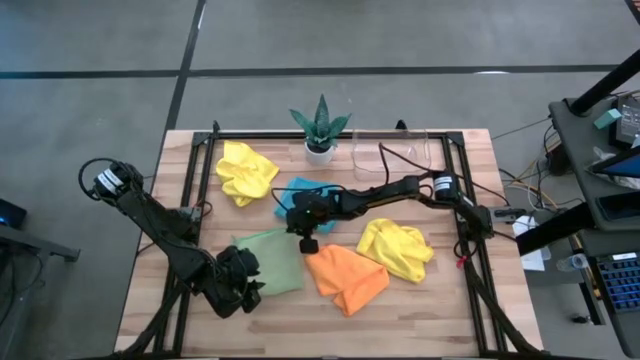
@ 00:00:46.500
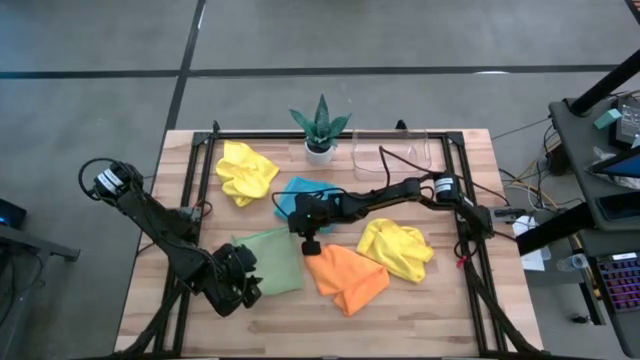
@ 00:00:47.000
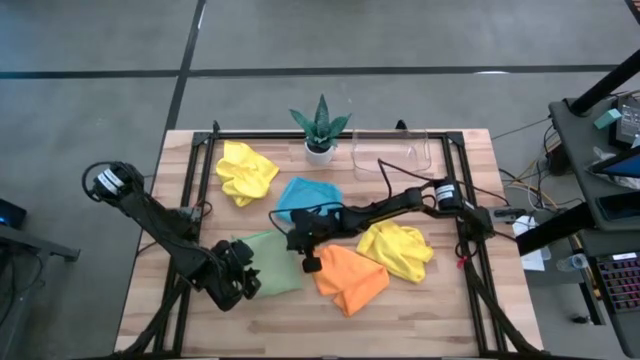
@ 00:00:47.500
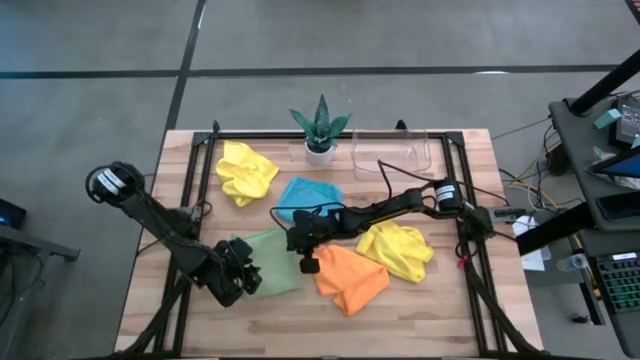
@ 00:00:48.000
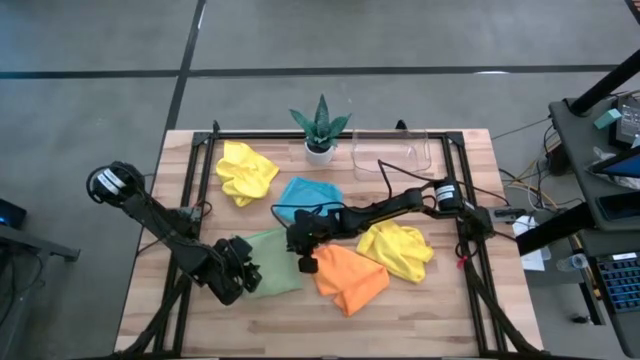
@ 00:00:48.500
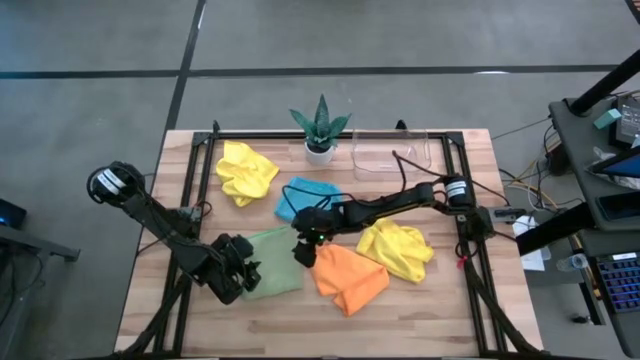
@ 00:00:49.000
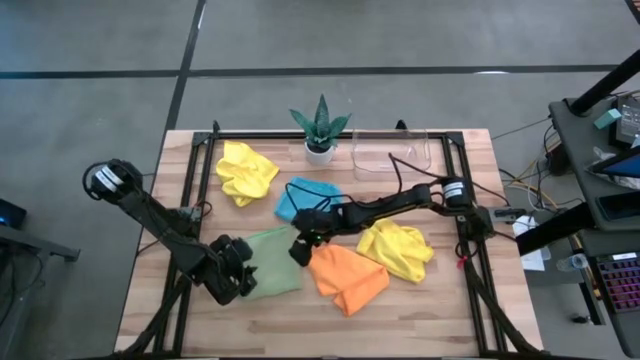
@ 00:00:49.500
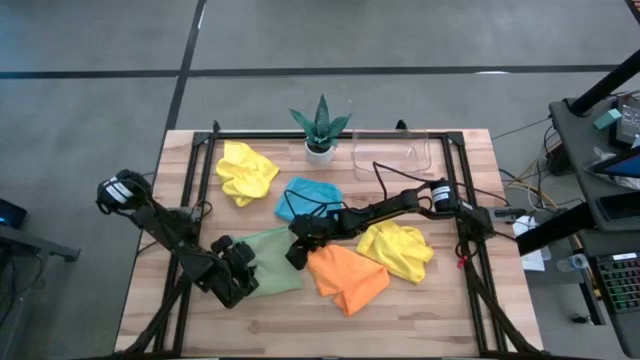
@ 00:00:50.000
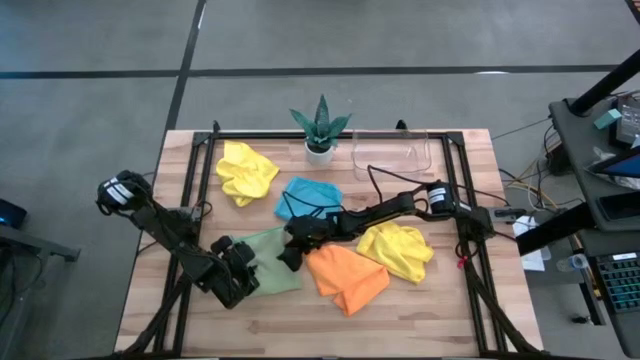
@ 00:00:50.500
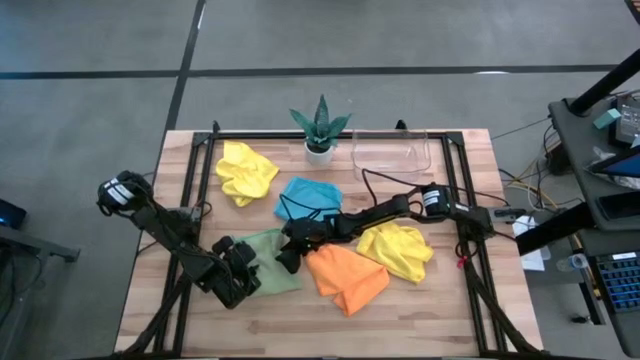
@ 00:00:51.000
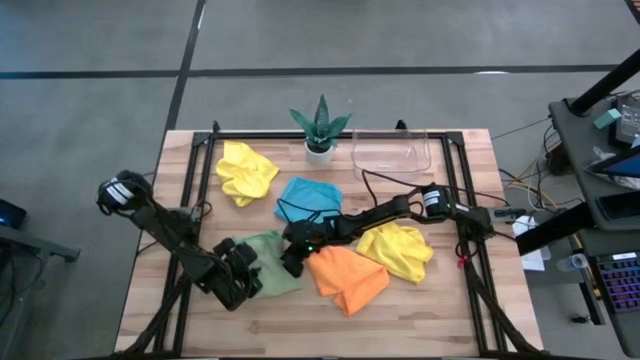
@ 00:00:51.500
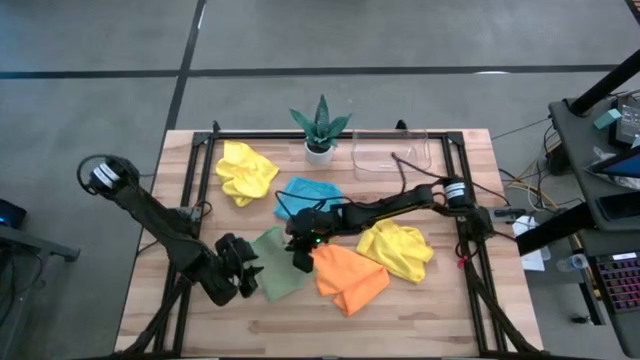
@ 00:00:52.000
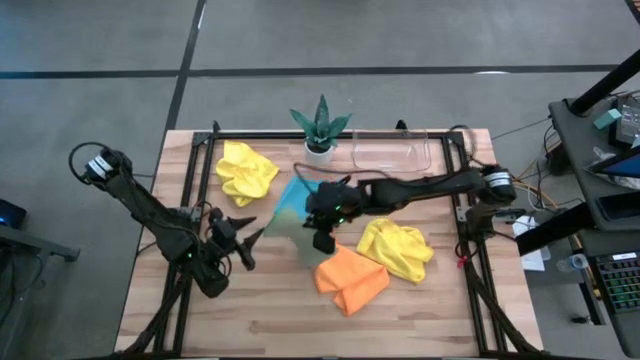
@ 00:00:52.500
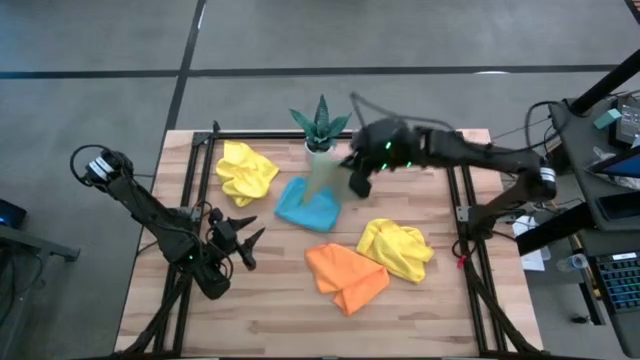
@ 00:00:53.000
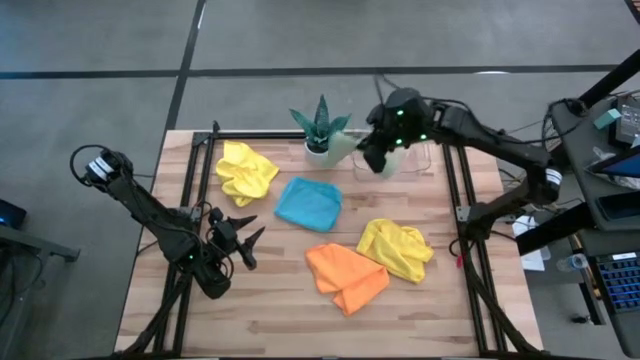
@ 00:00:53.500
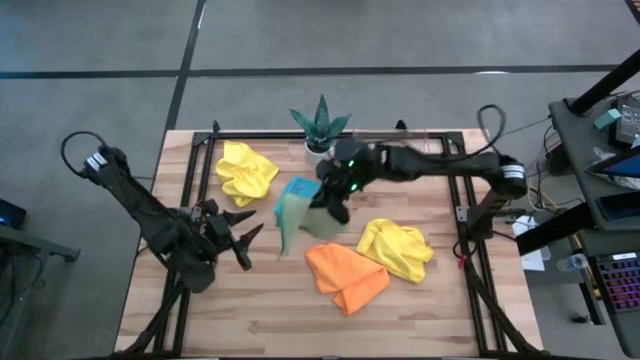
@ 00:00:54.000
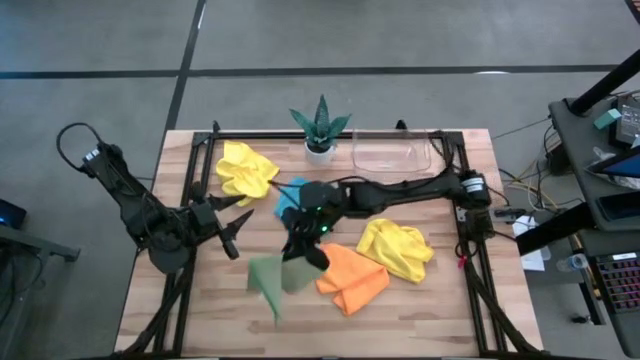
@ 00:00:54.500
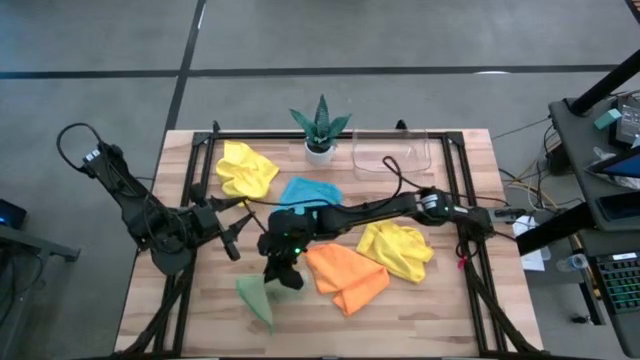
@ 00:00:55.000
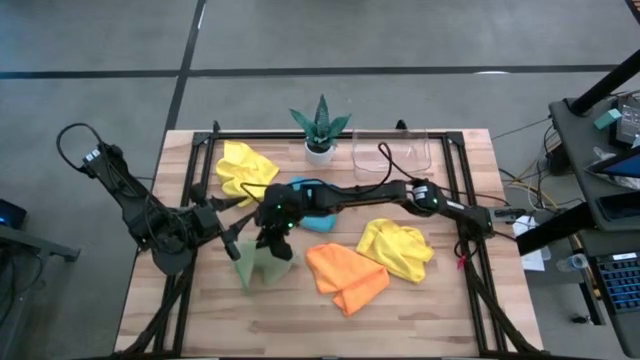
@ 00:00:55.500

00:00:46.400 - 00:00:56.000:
Task: Fold microfiber towels
Put the green microfiber towel into the transparent bin

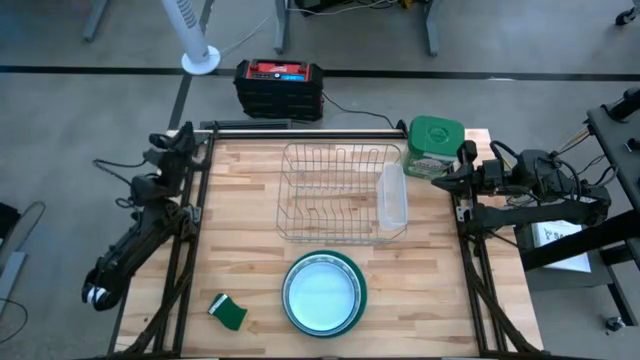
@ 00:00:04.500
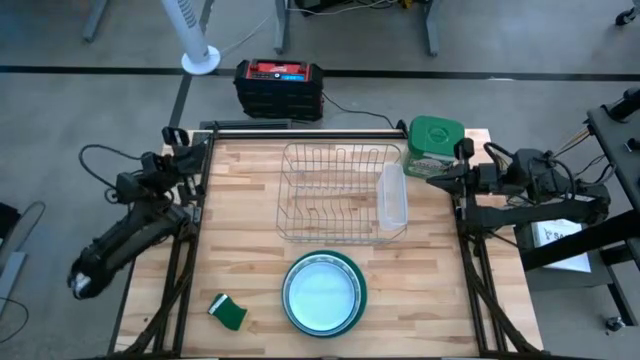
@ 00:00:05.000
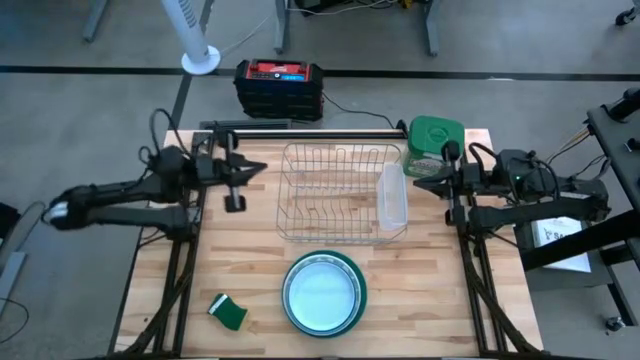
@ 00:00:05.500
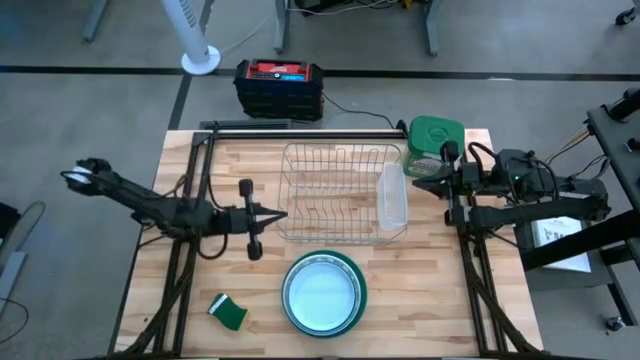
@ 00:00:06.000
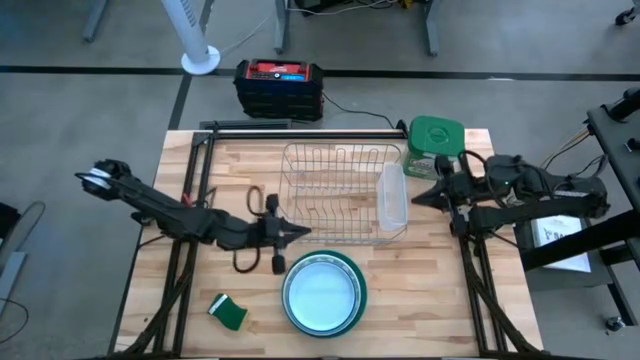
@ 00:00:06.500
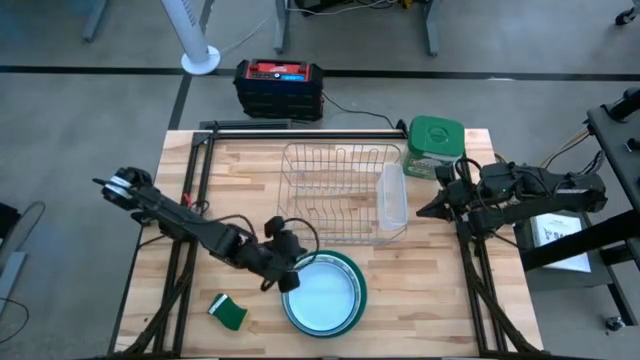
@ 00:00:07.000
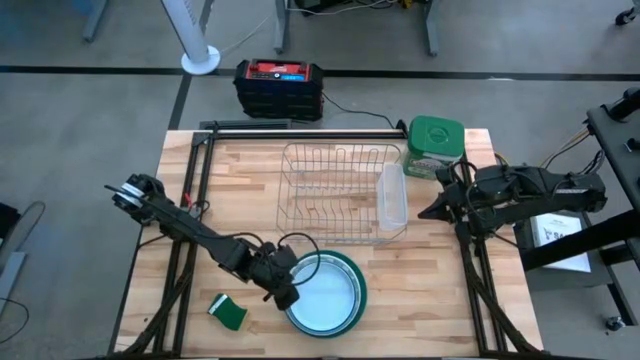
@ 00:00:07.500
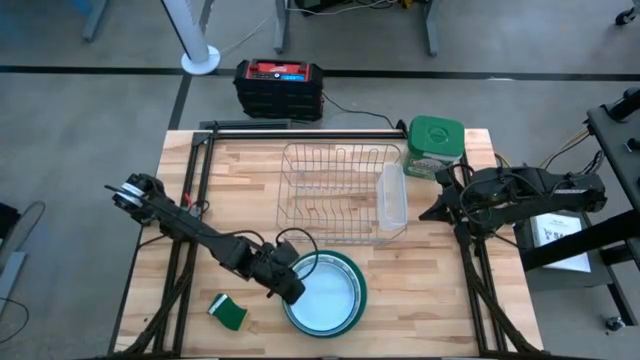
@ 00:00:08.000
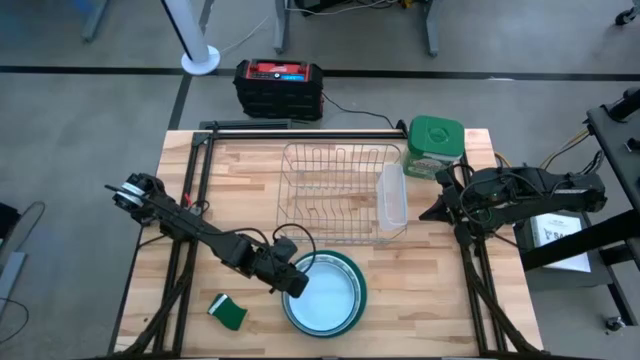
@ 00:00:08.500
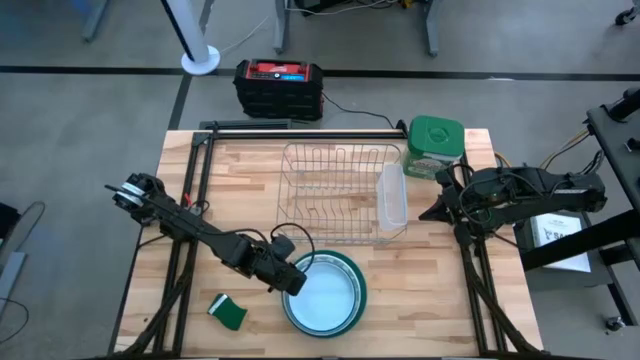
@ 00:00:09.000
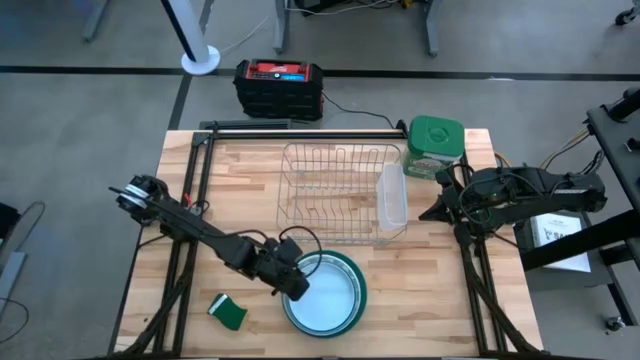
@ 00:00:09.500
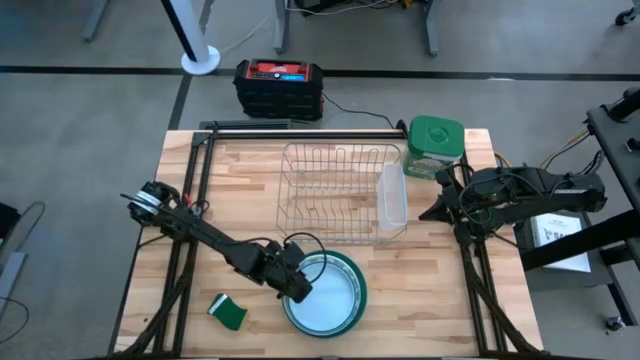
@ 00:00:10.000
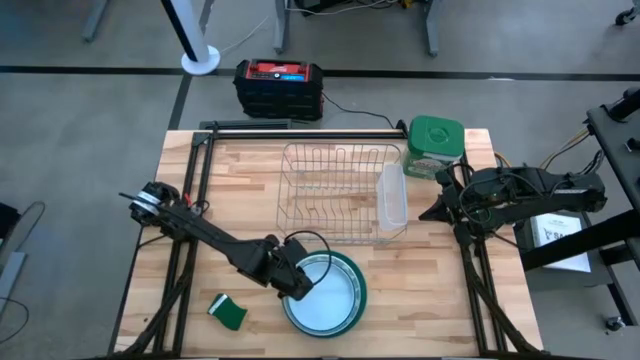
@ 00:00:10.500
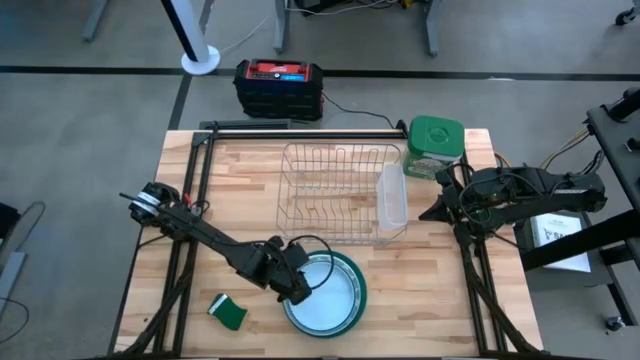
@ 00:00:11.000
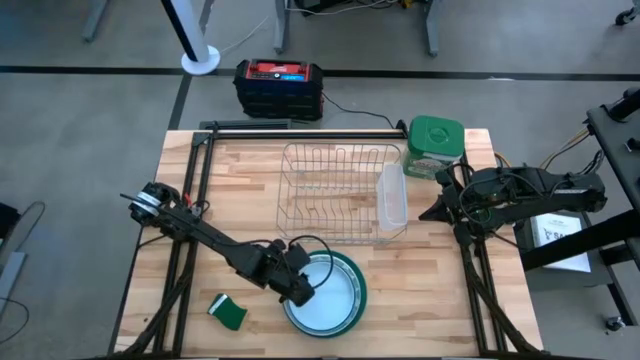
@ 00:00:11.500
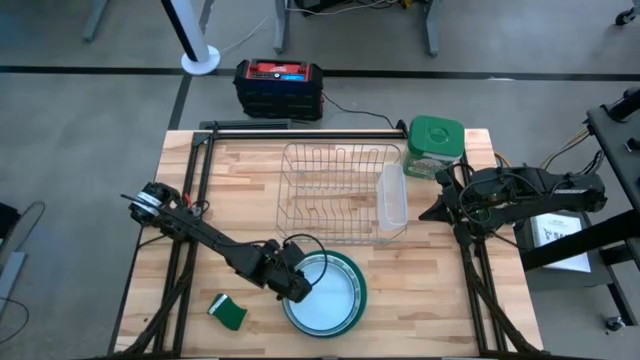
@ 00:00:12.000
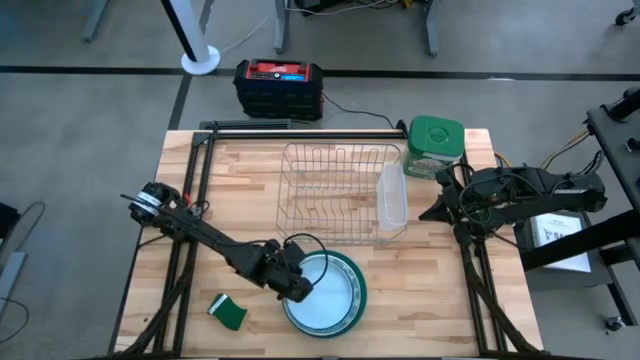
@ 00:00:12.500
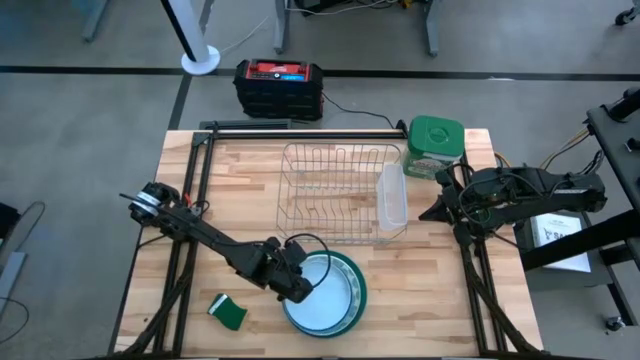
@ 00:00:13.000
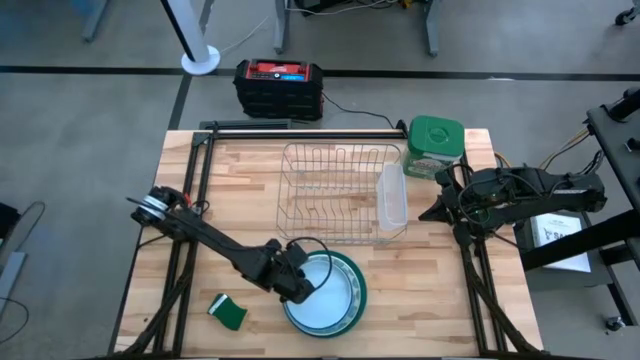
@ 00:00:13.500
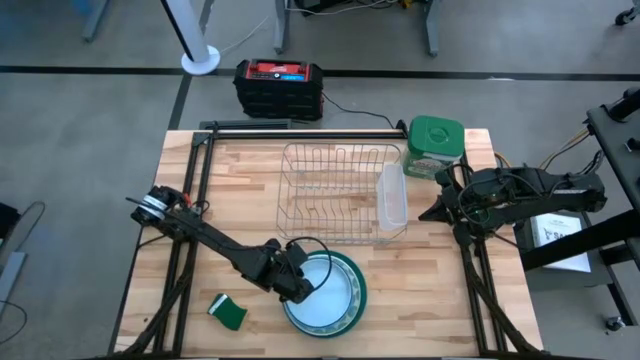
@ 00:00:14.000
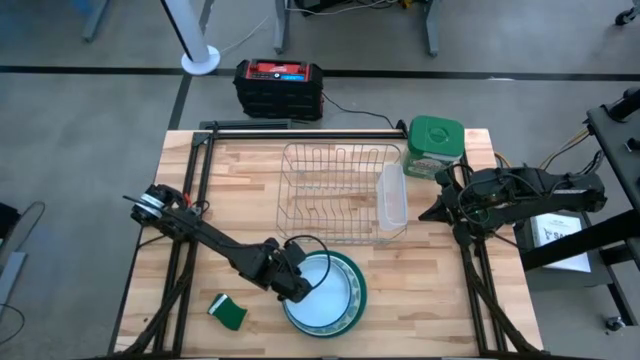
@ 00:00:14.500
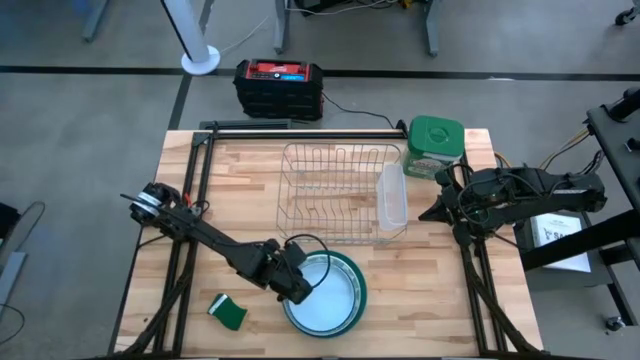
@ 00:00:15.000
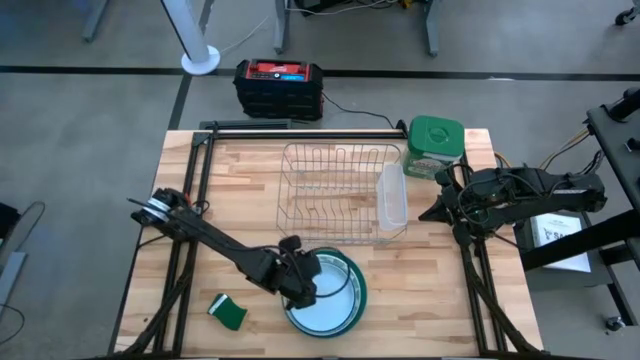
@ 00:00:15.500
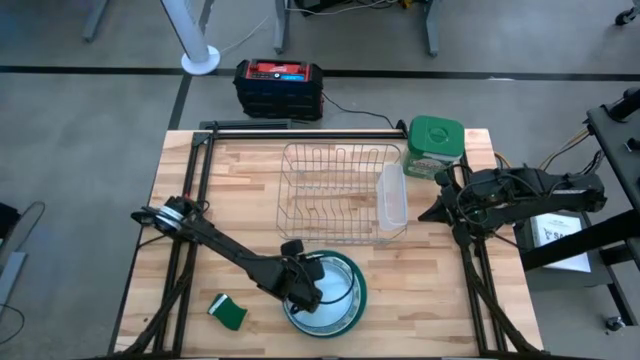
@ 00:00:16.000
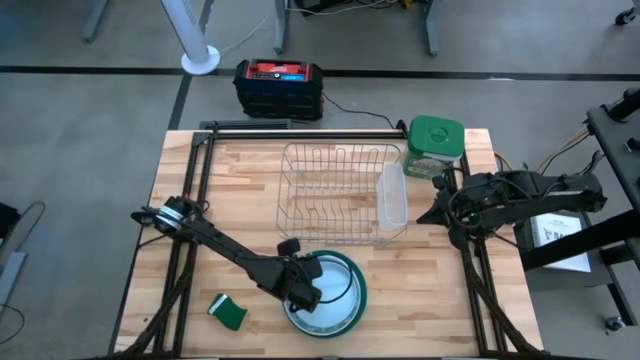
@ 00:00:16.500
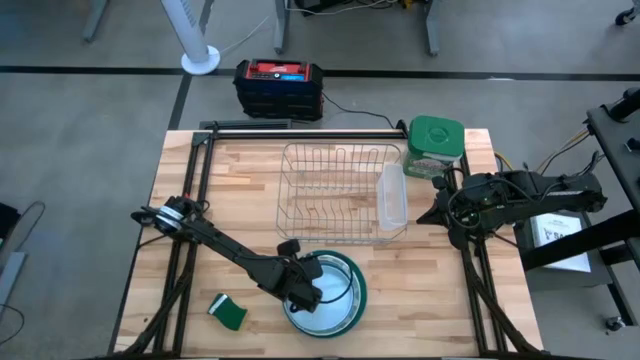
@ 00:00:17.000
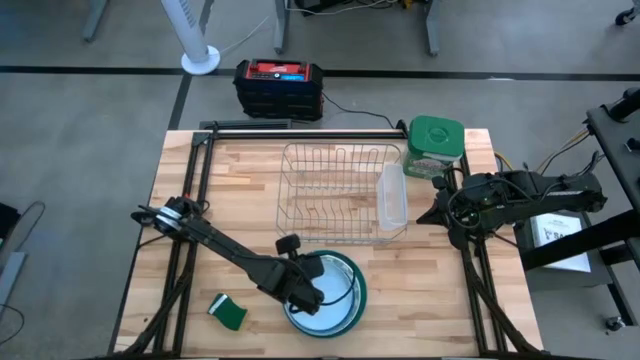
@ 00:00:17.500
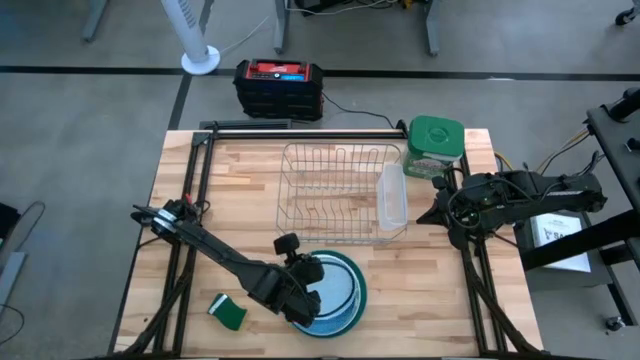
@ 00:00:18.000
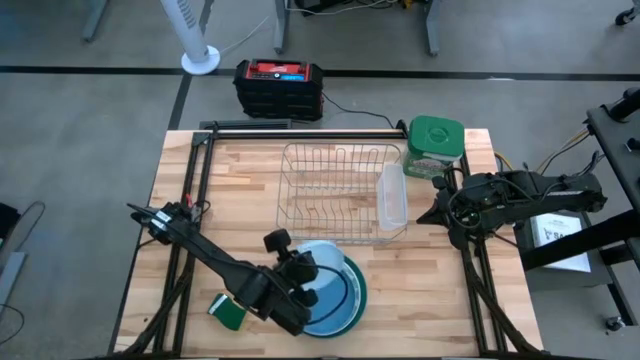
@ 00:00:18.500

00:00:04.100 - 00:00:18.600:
Task: Sort dishes
Put the light blue plate in the dish rack
